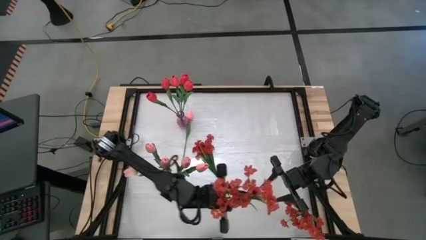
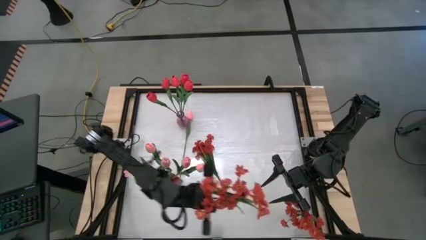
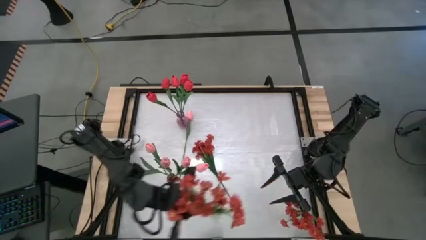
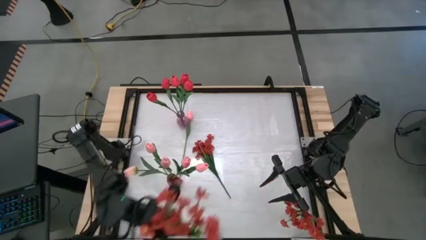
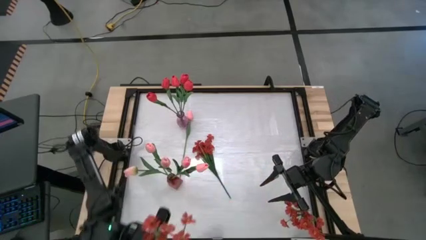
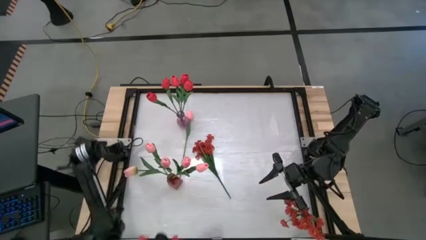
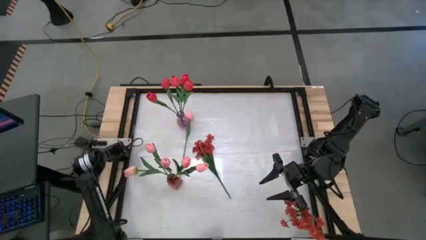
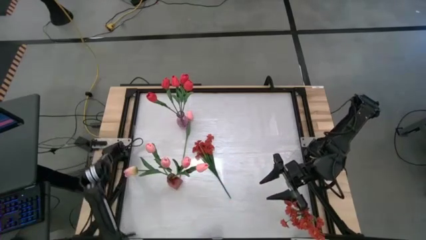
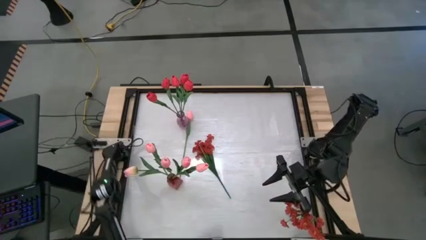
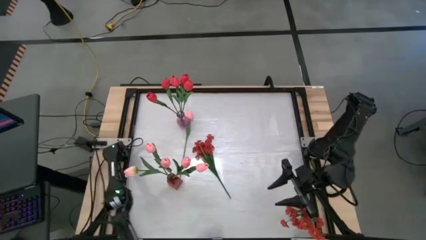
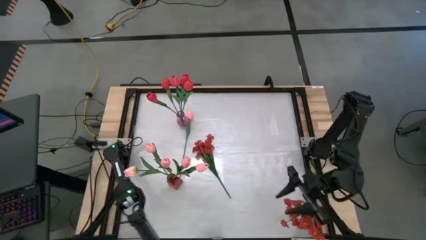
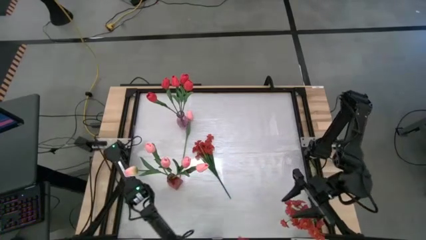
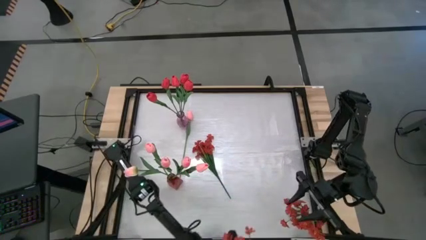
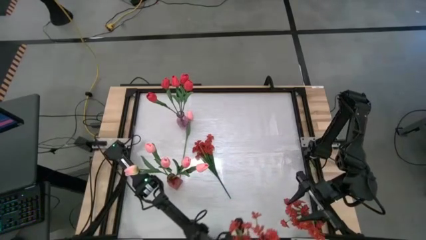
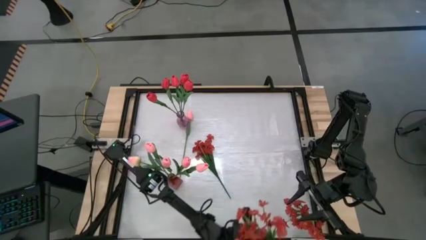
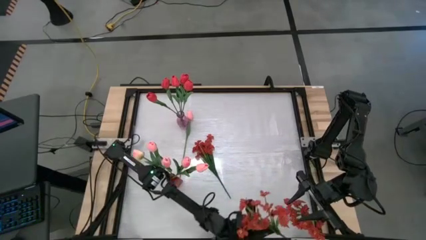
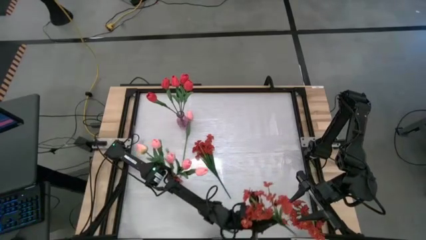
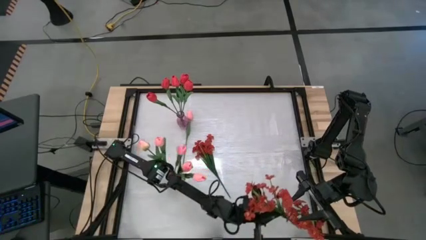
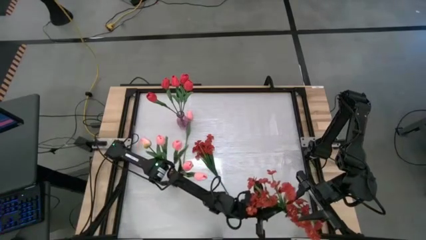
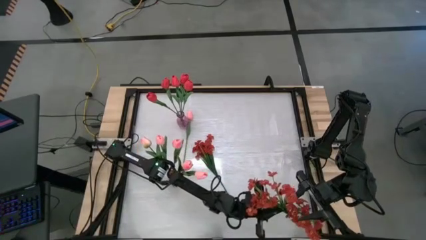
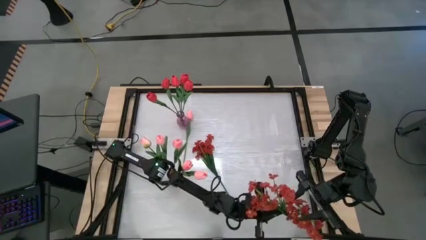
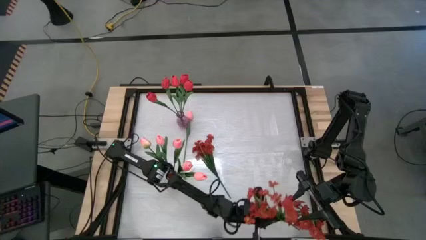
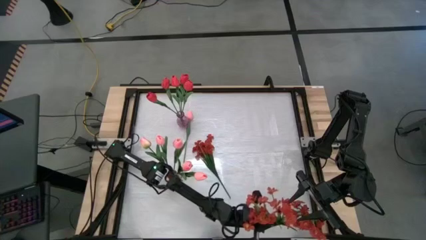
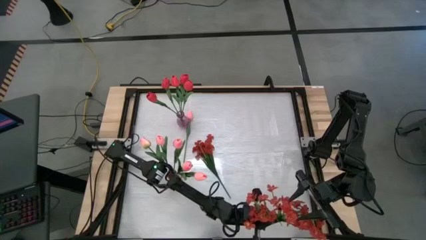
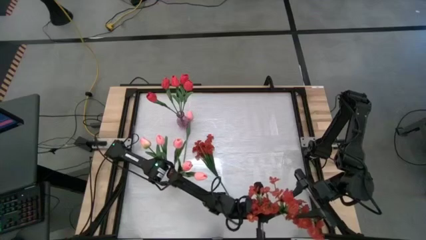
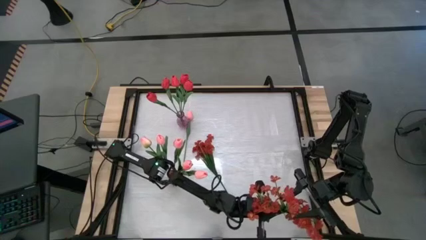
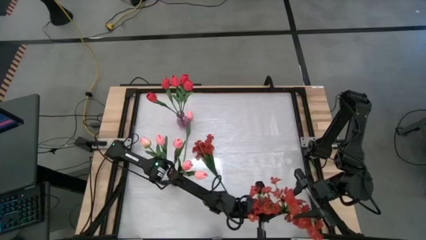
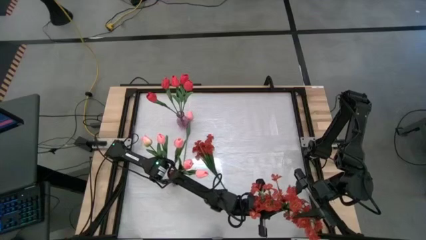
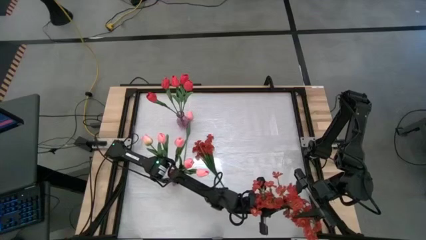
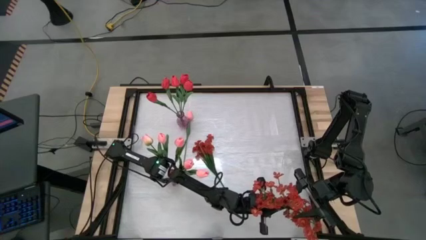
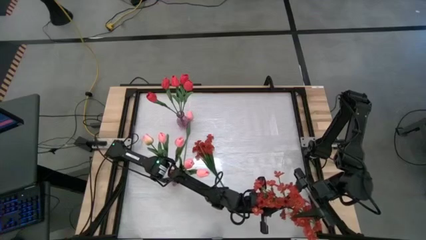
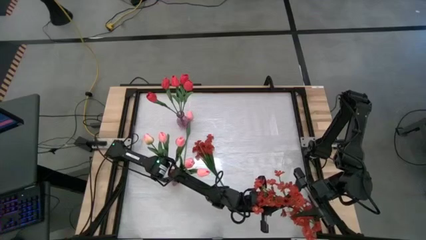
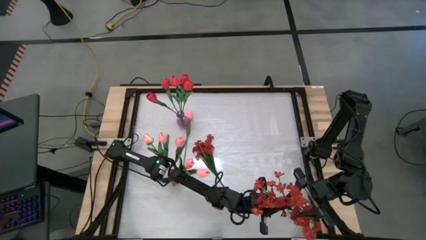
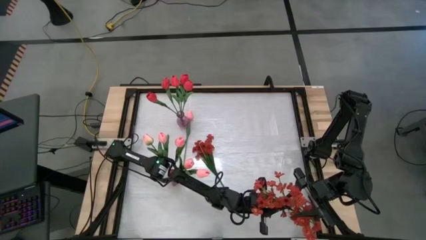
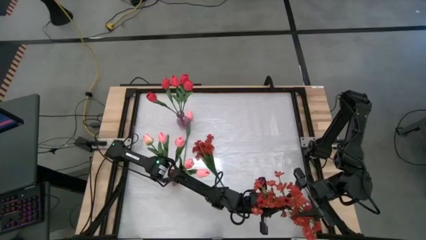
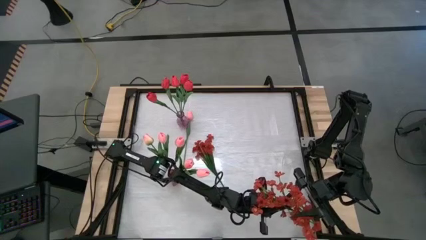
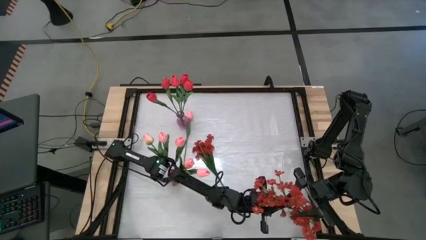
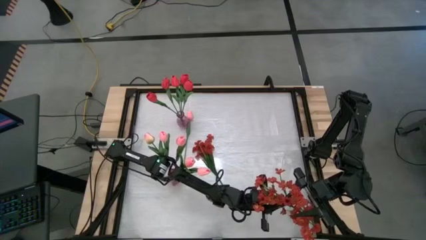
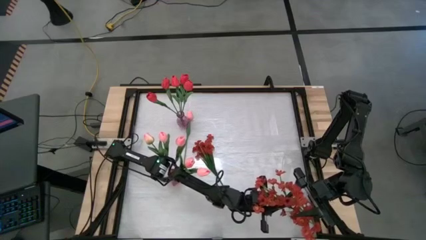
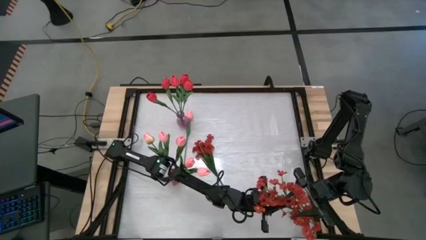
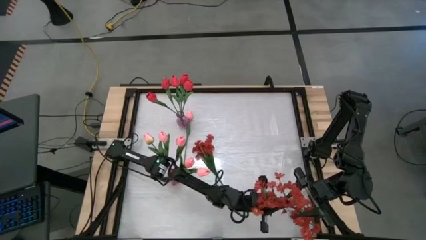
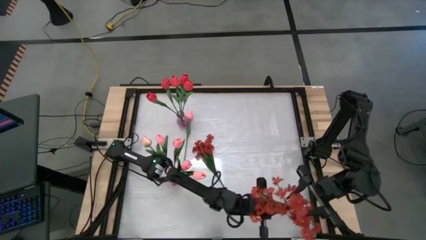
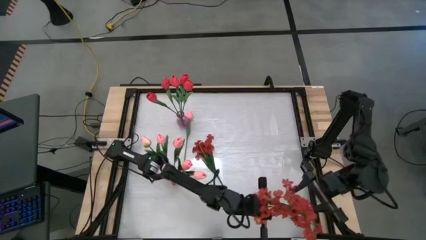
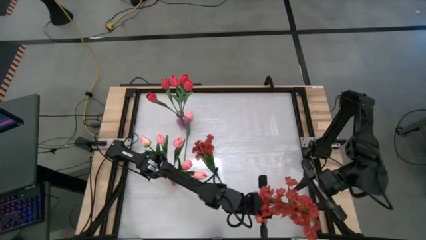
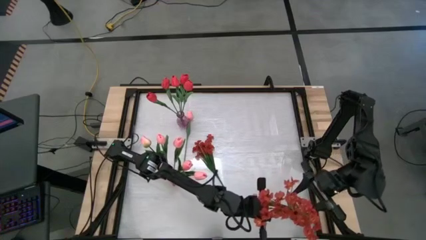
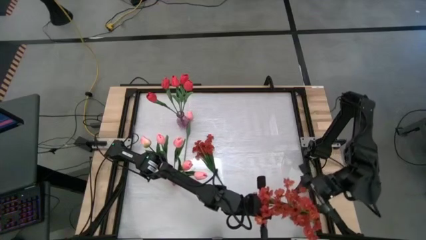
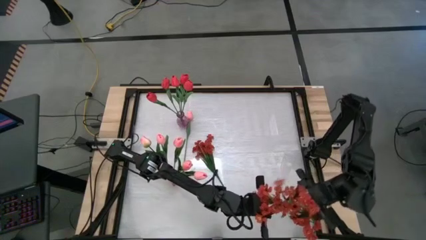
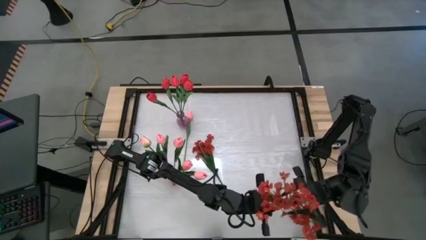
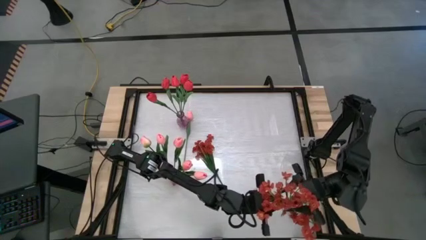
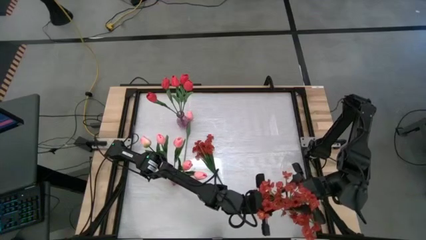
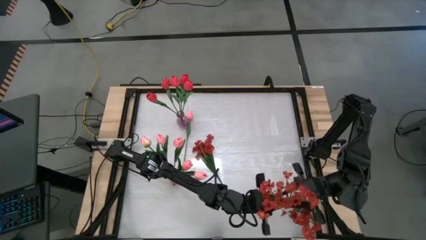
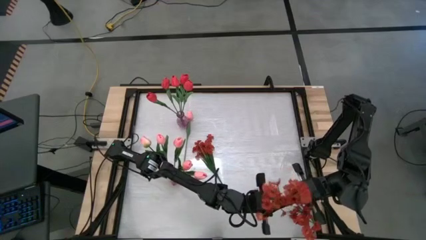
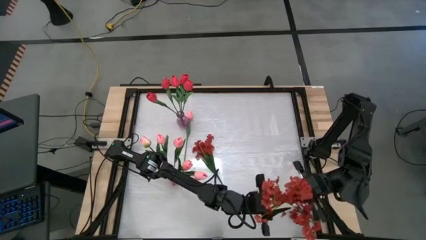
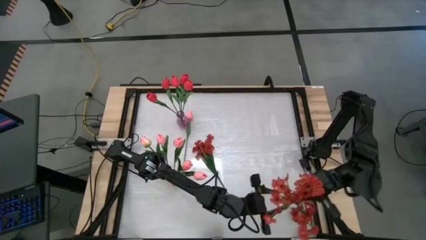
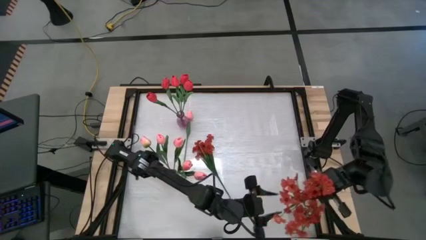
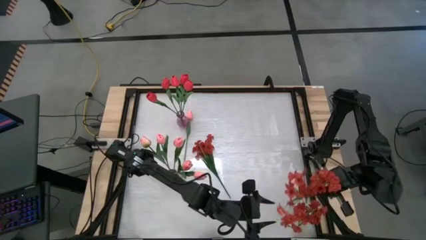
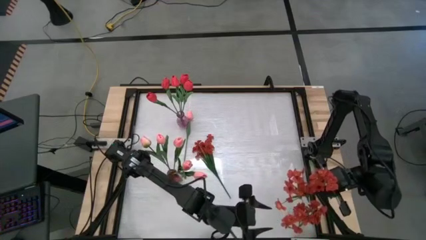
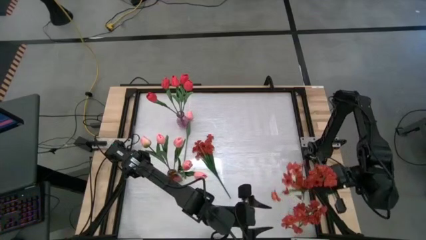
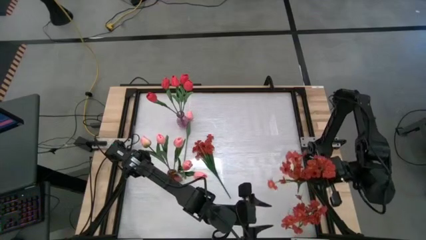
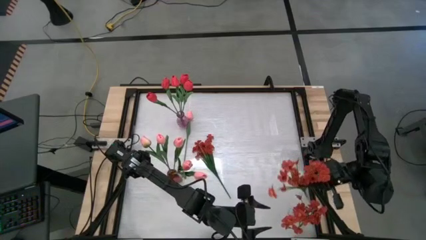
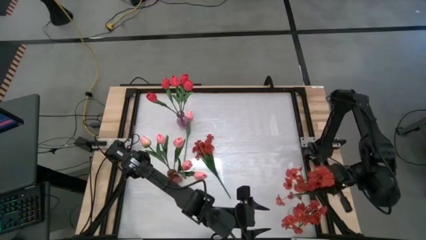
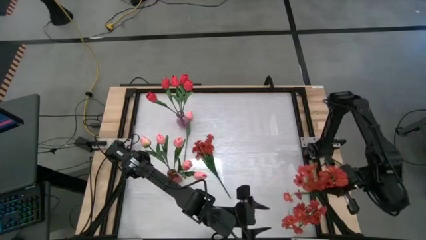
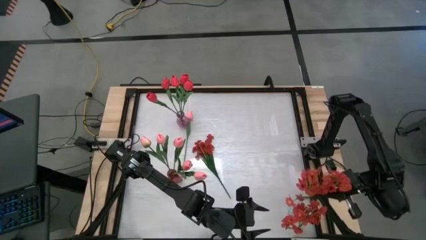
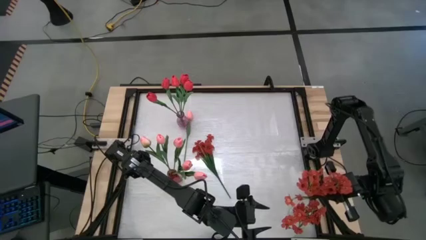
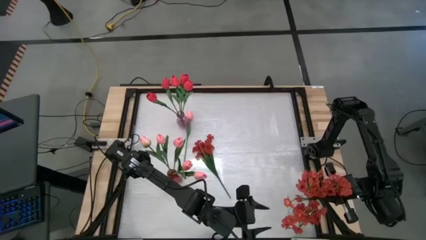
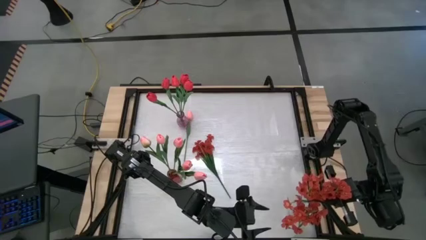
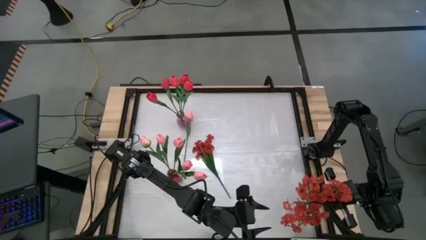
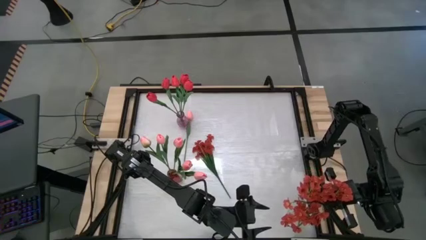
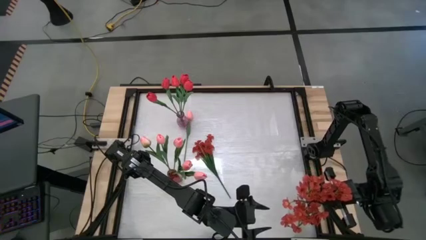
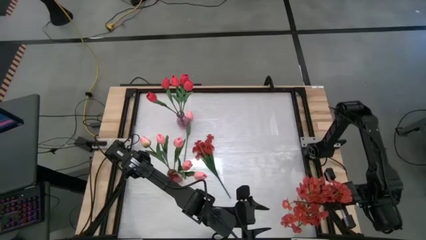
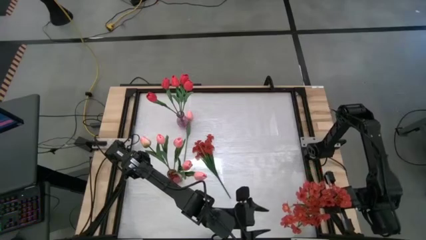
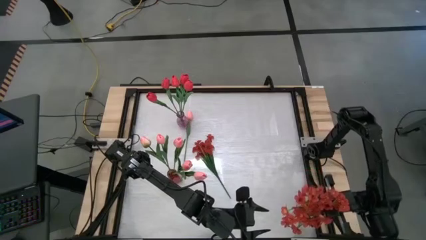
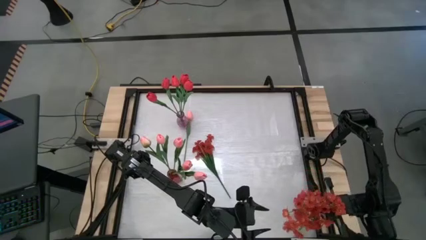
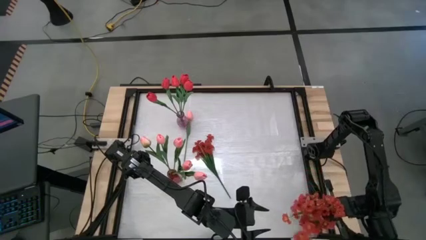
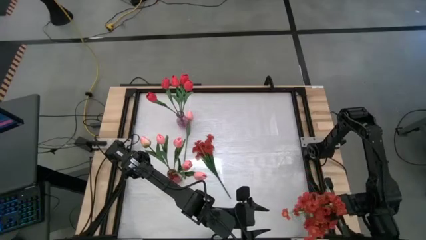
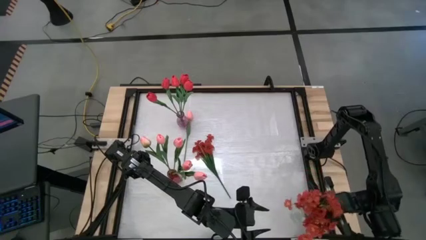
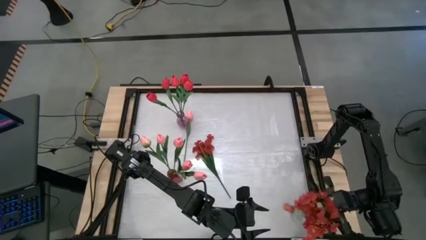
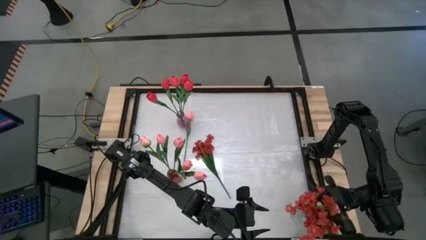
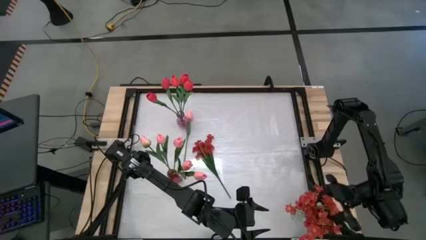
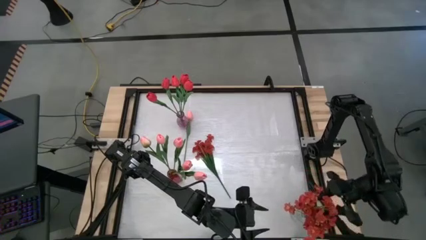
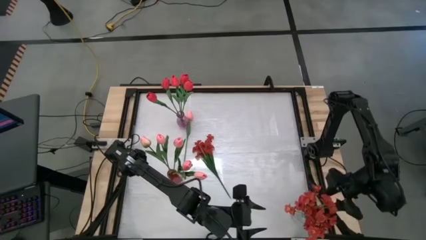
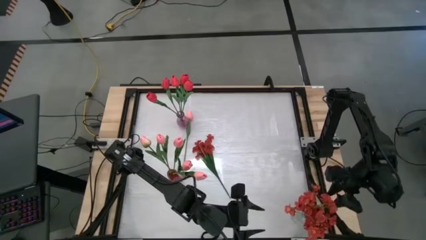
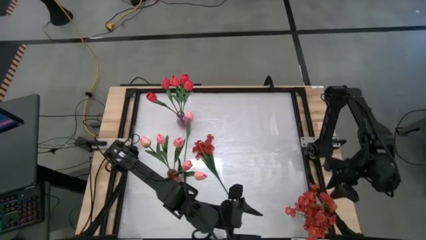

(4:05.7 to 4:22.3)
Task: Sort flowers into vase by color
Put the red flowers into the transparent vase
